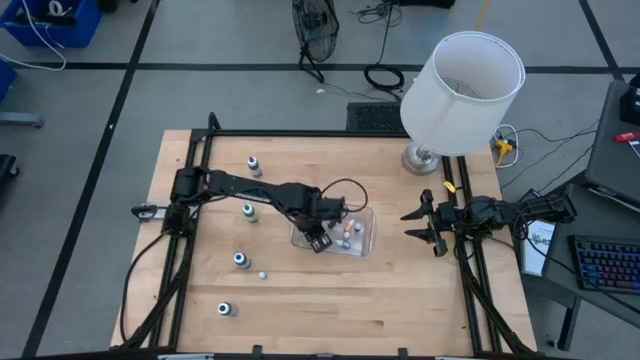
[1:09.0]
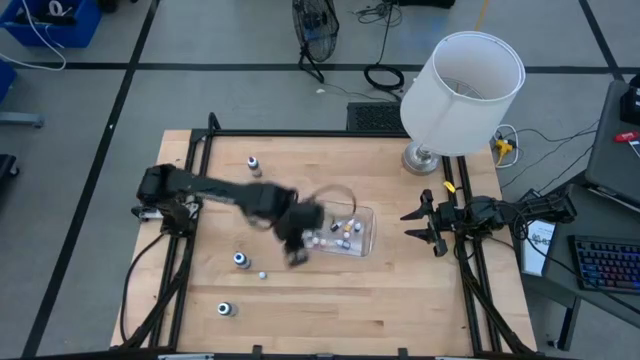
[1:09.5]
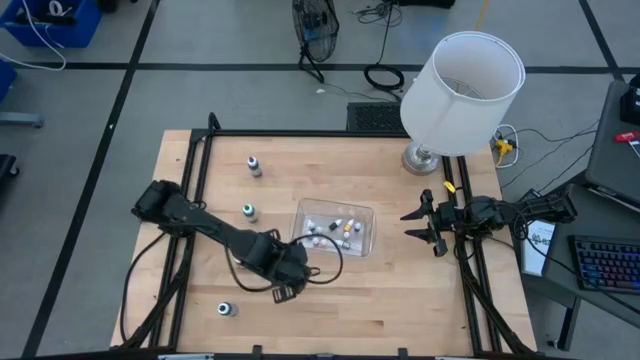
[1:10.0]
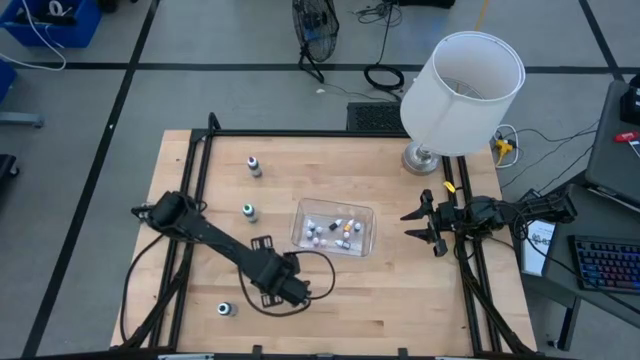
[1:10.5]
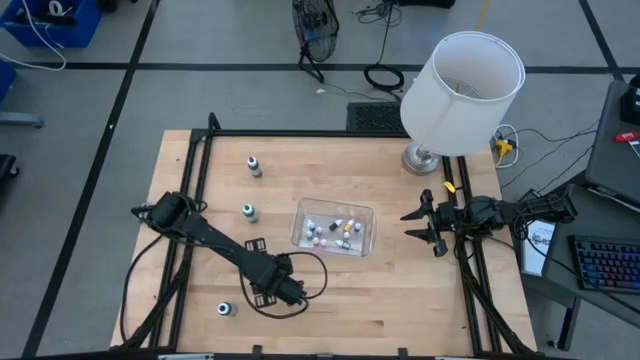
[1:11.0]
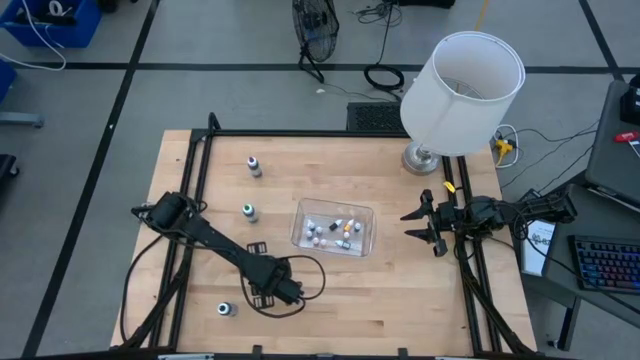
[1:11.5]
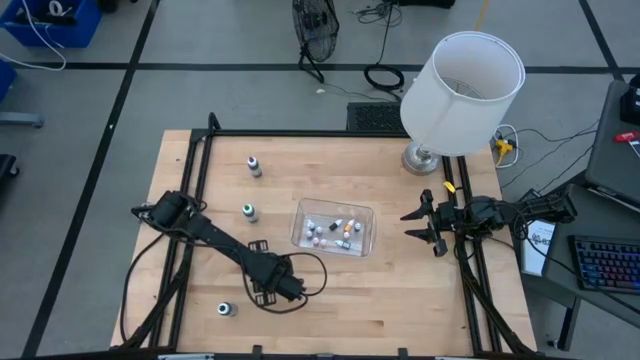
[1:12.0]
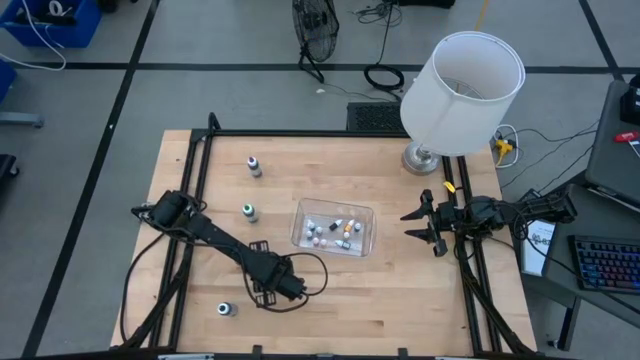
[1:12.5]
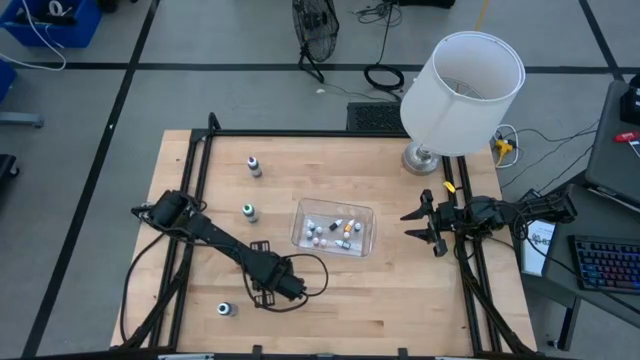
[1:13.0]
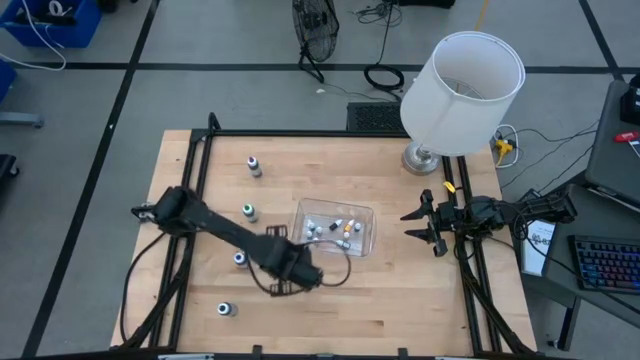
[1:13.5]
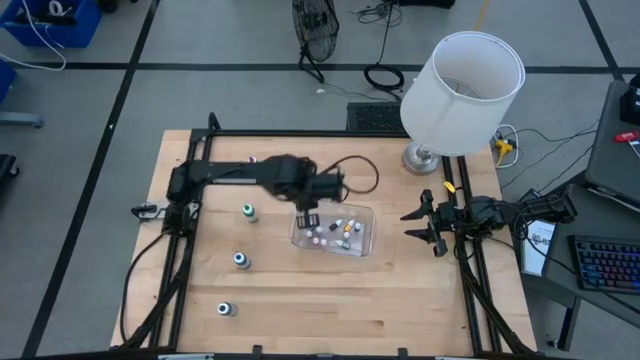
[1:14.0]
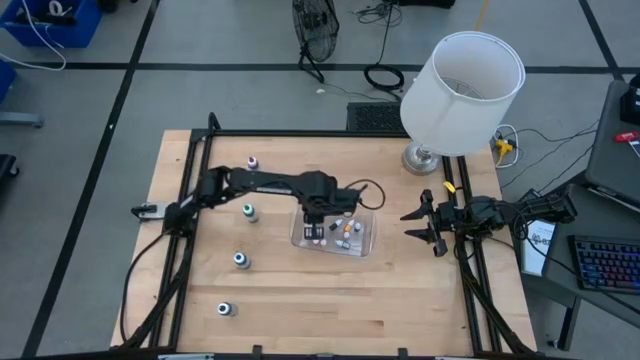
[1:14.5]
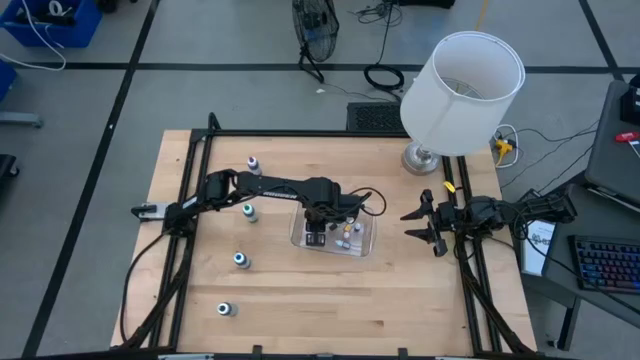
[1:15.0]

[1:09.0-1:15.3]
Task: Pick & Place food coloring
Put the small black food coloring bottle into the transparent bin

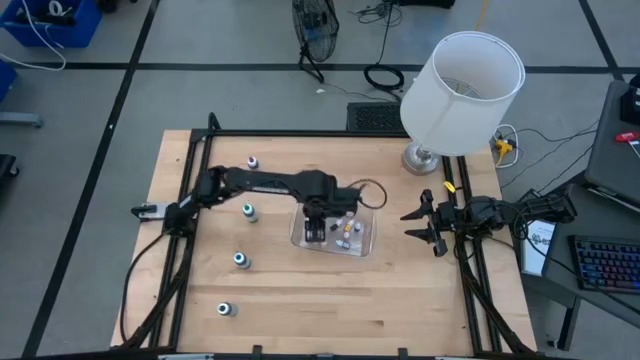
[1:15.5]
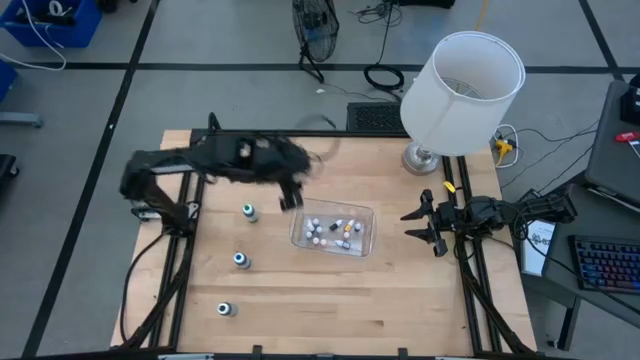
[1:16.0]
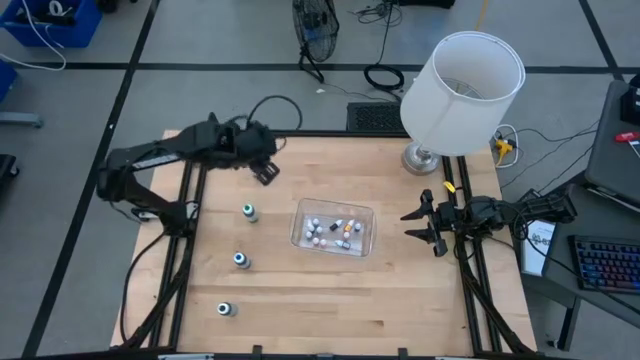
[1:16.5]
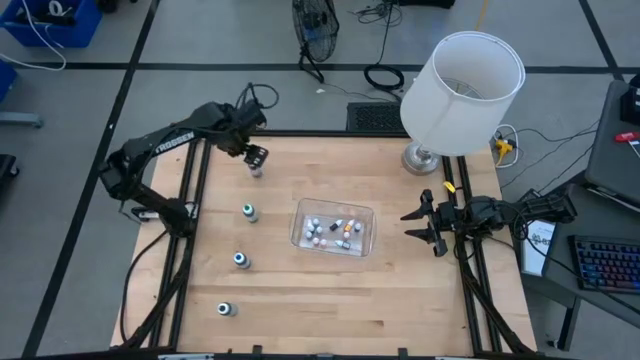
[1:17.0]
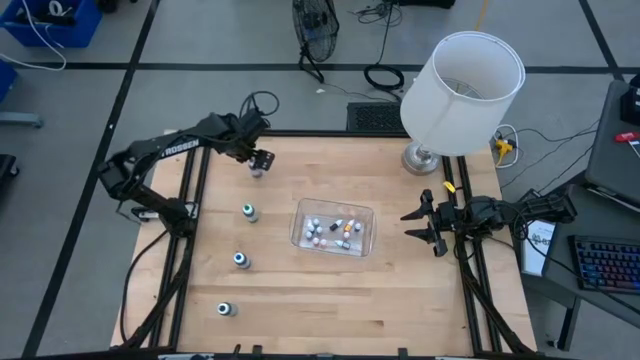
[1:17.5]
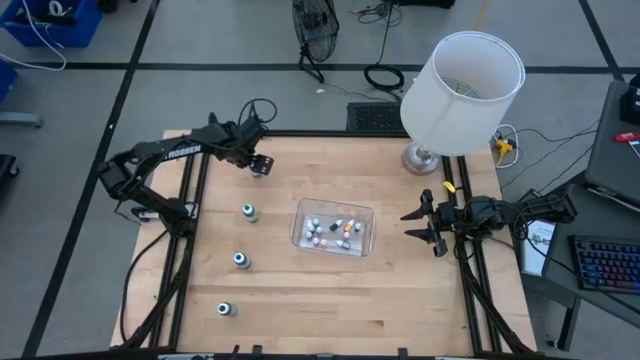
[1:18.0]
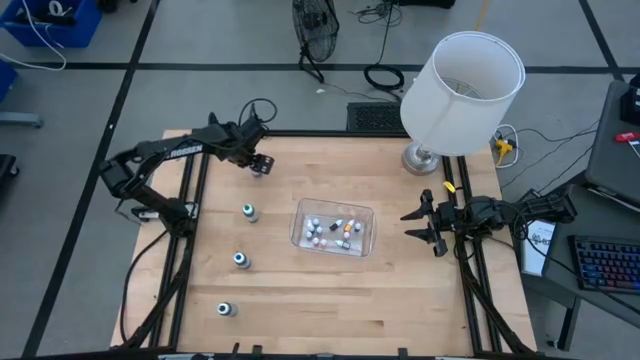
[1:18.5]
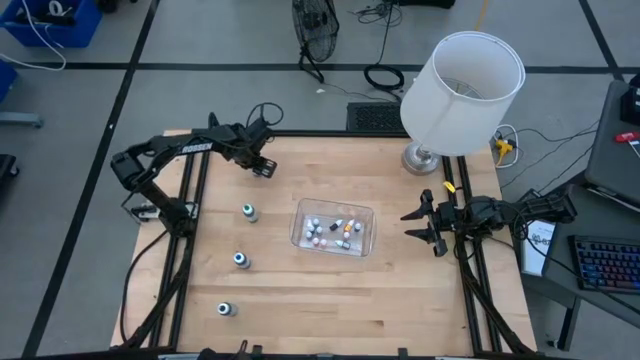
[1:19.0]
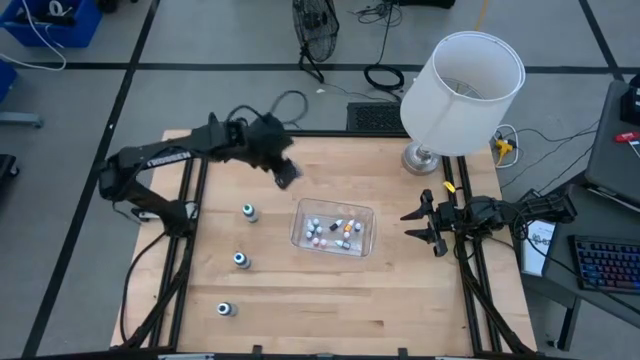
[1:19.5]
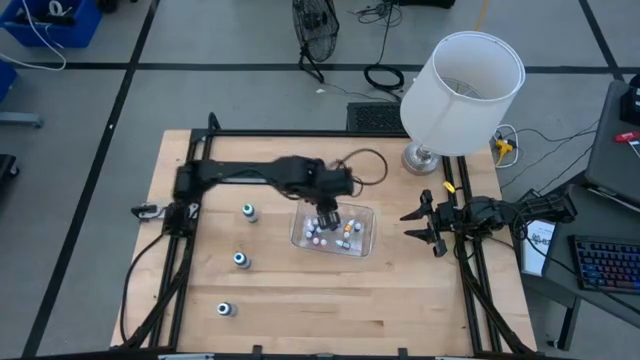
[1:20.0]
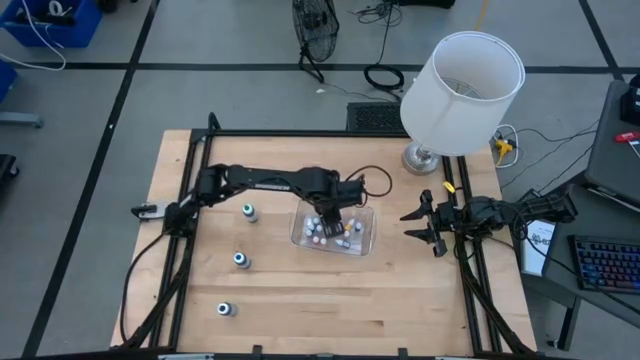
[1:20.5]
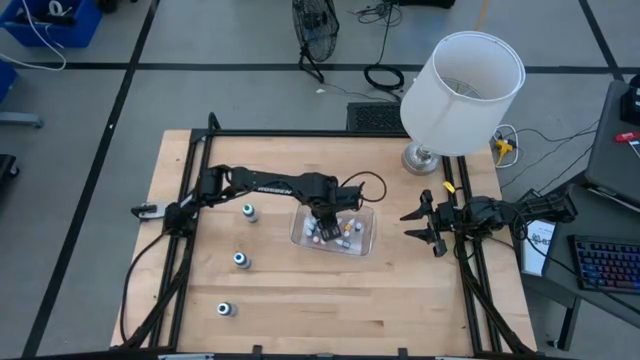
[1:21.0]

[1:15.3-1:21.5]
Put the large purple food coloring bottle into the transparent bin

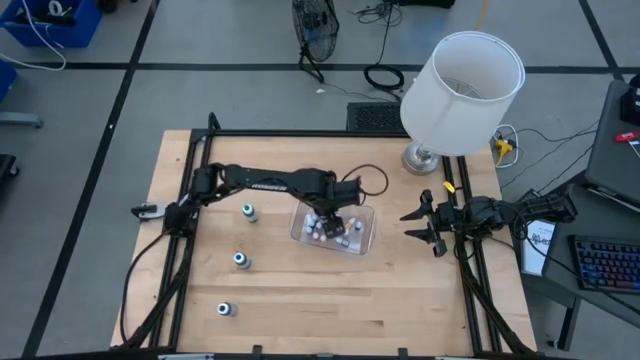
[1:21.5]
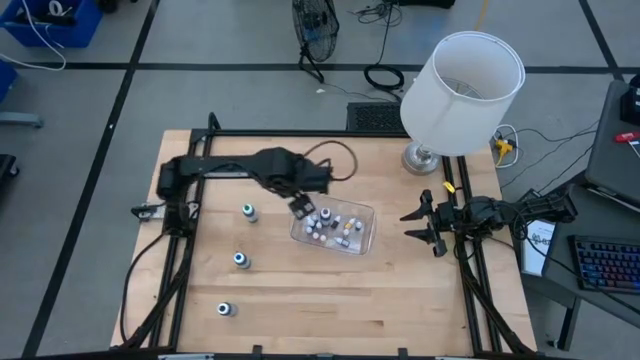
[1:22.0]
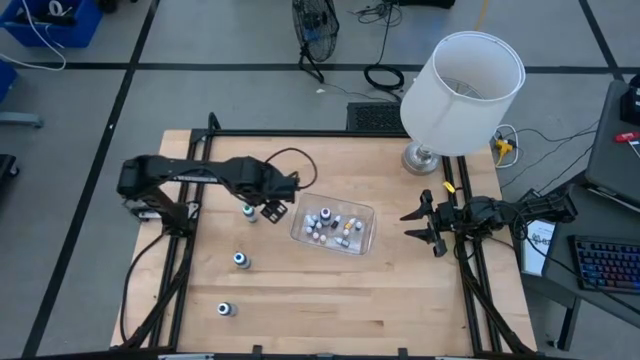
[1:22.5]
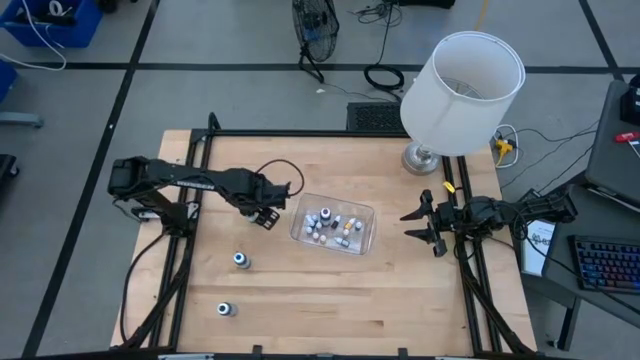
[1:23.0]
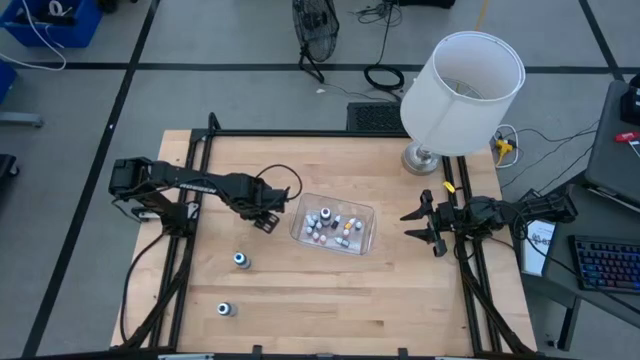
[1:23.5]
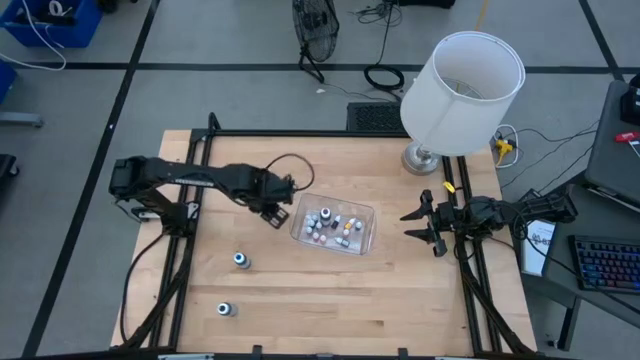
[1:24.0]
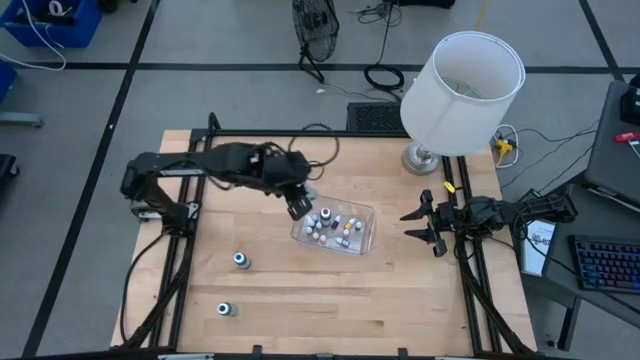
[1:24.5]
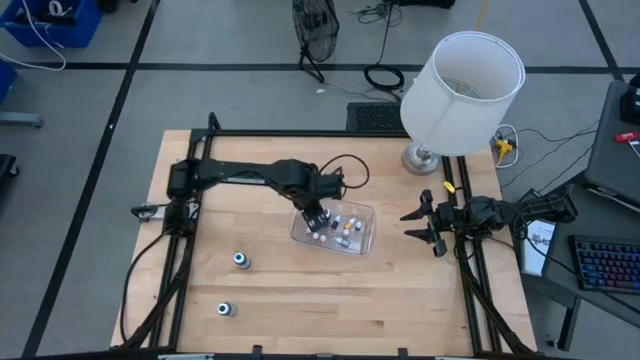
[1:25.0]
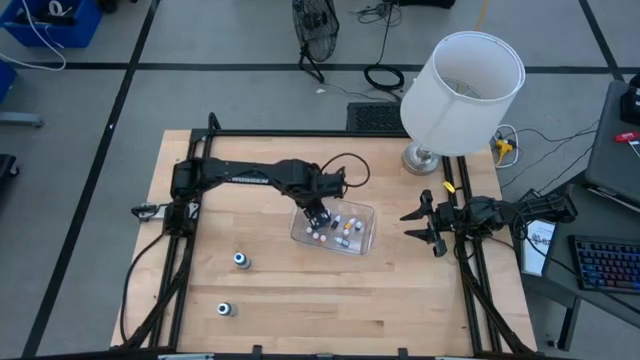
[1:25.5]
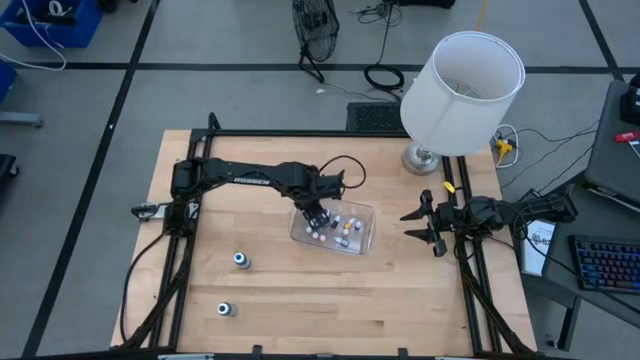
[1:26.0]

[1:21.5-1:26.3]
Put the large green food coloring bottle into the transparent bin

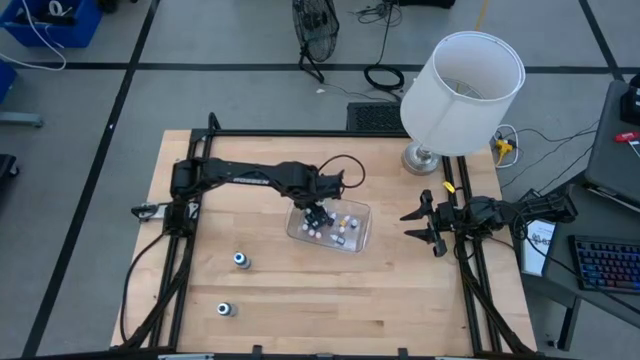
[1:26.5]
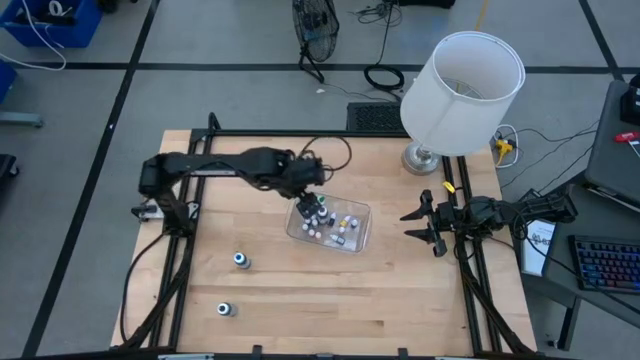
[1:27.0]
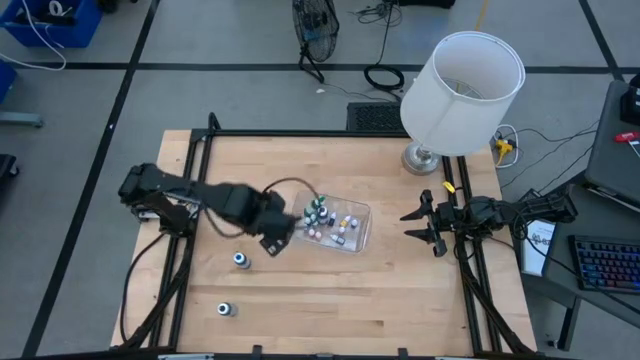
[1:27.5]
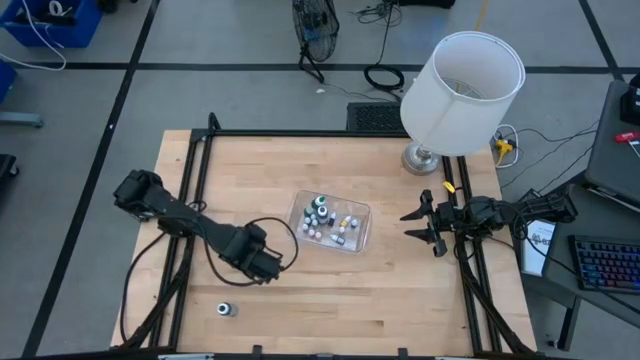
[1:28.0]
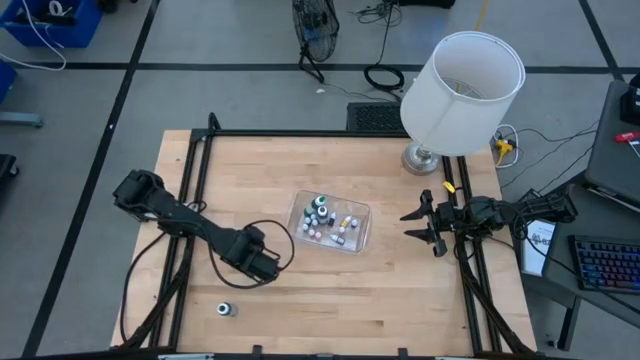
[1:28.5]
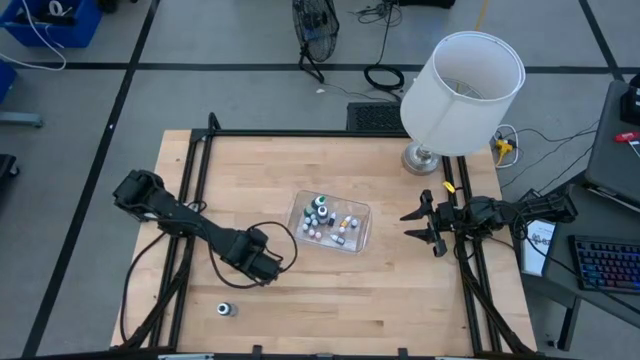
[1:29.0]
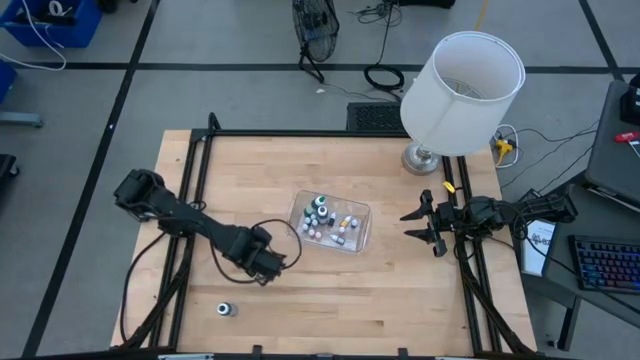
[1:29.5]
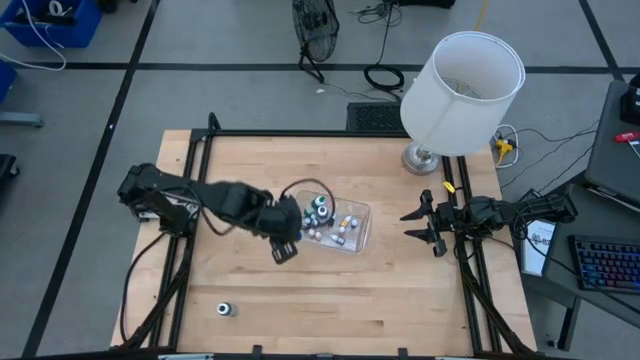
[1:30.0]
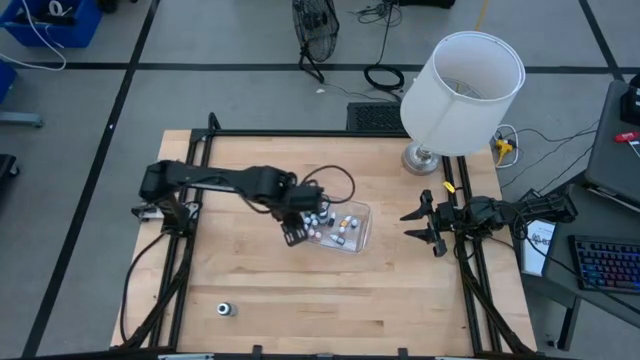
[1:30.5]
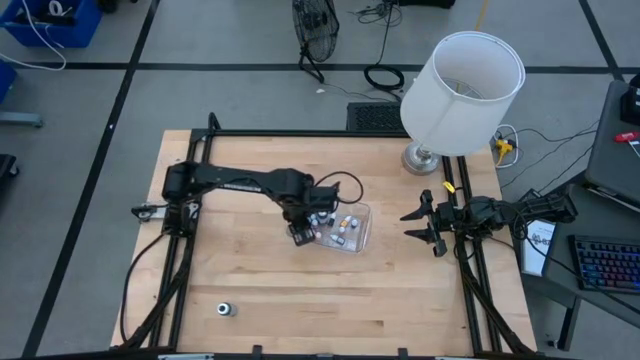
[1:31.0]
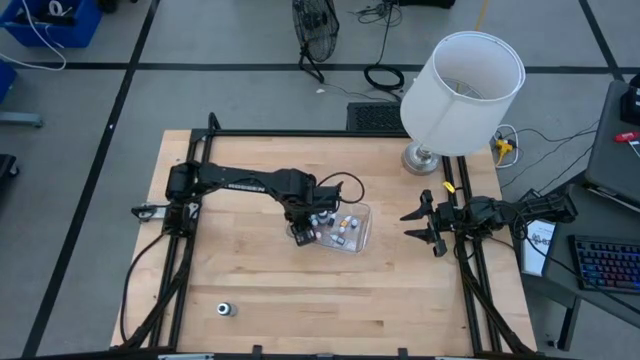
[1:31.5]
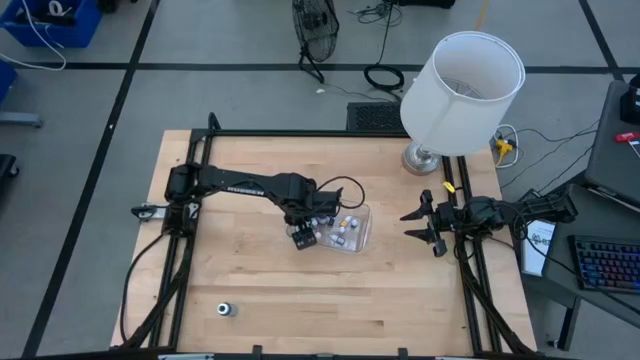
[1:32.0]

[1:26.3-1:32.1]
Put the large blue food coloring bottle into the transparent bin
